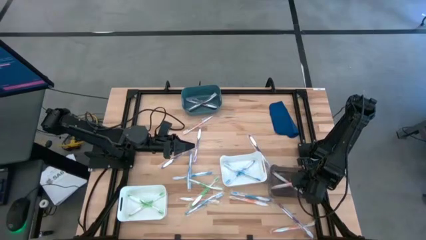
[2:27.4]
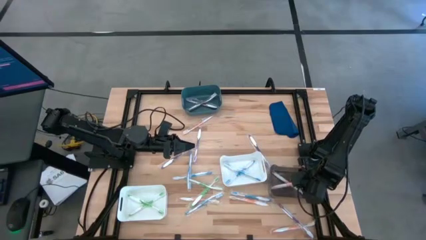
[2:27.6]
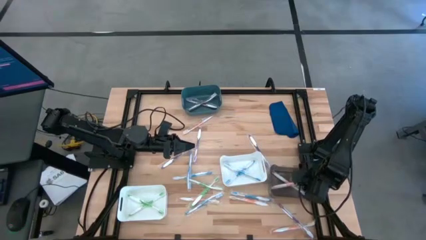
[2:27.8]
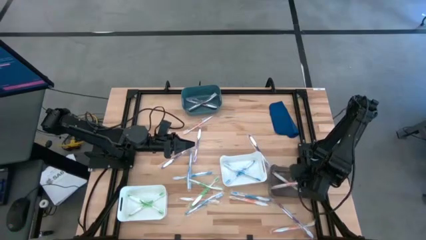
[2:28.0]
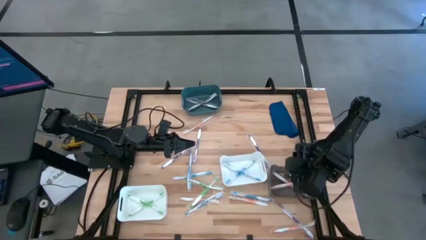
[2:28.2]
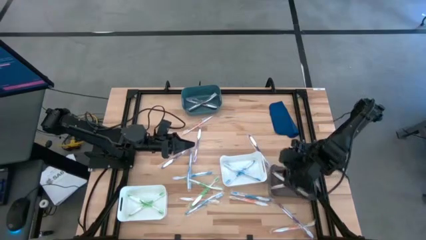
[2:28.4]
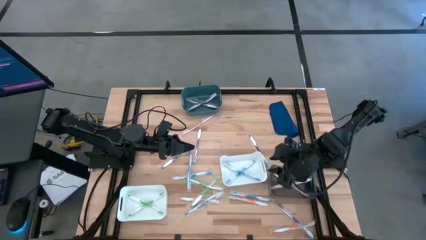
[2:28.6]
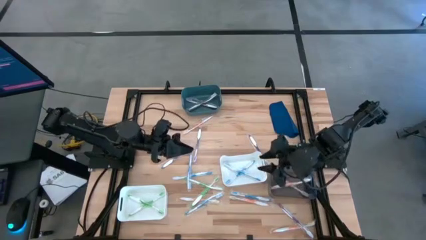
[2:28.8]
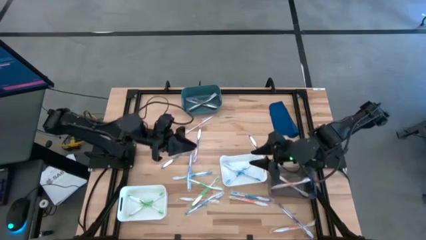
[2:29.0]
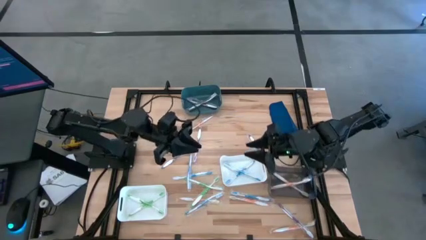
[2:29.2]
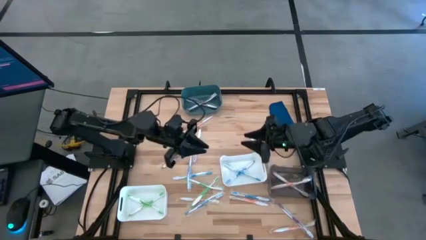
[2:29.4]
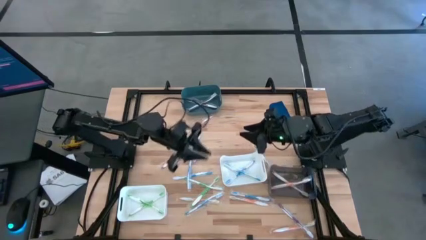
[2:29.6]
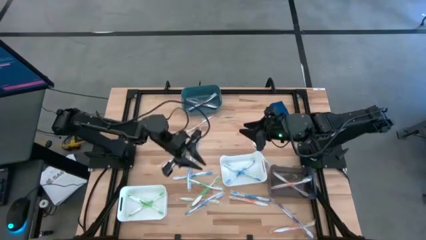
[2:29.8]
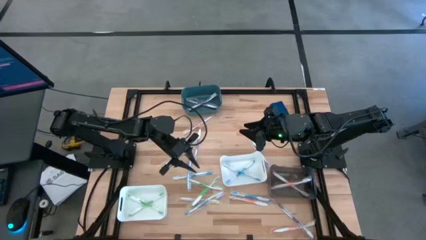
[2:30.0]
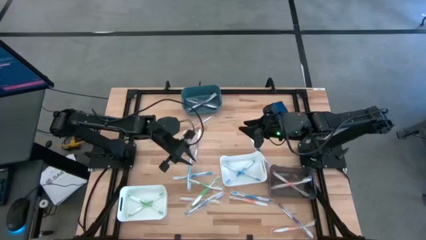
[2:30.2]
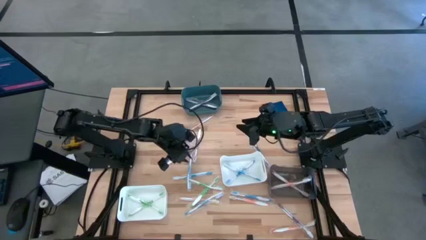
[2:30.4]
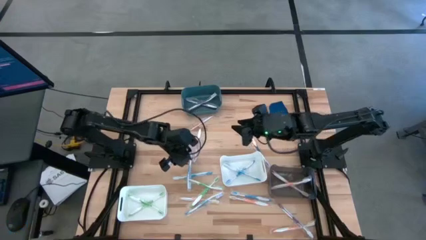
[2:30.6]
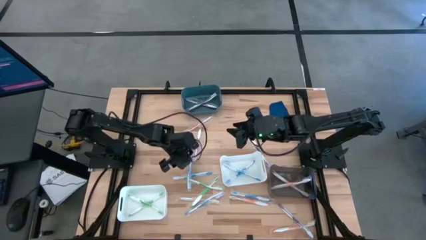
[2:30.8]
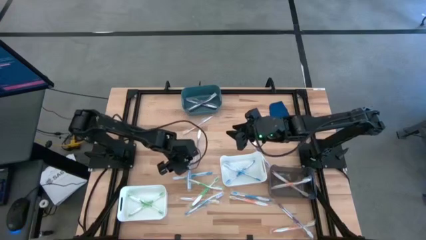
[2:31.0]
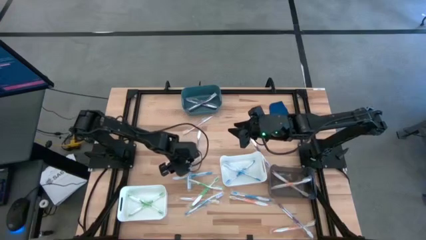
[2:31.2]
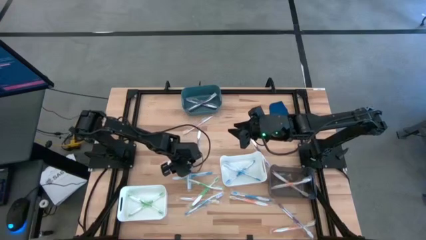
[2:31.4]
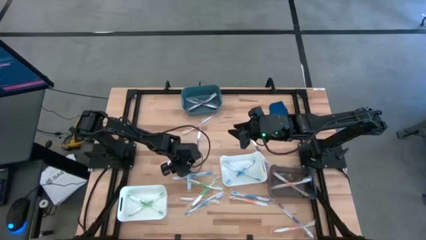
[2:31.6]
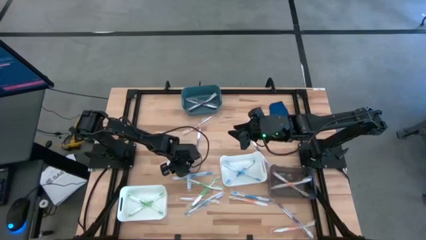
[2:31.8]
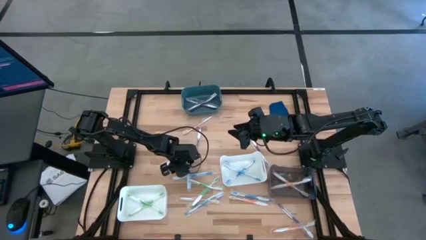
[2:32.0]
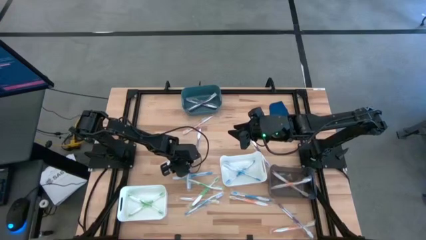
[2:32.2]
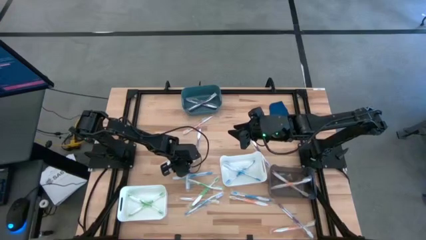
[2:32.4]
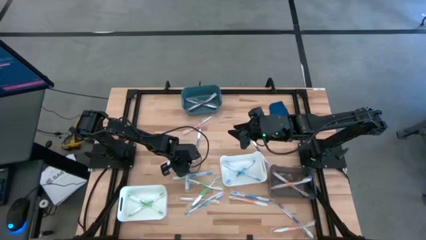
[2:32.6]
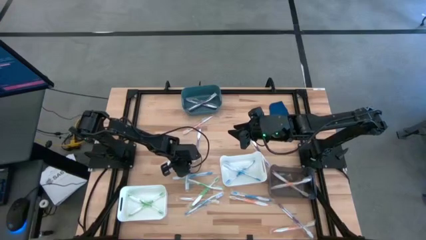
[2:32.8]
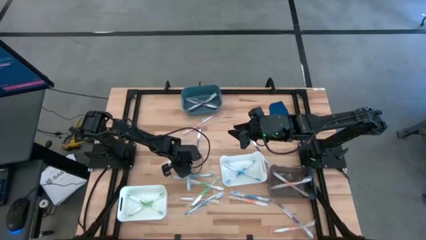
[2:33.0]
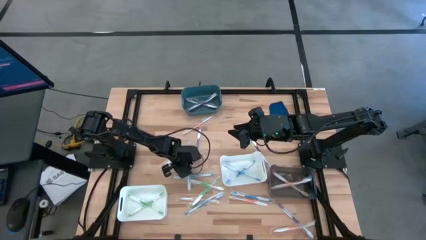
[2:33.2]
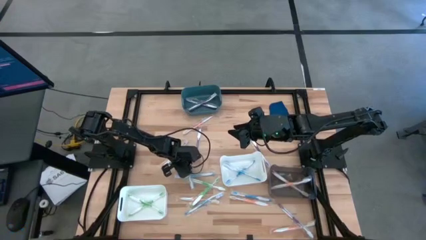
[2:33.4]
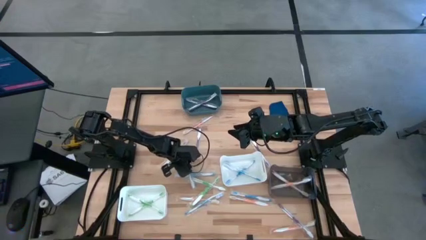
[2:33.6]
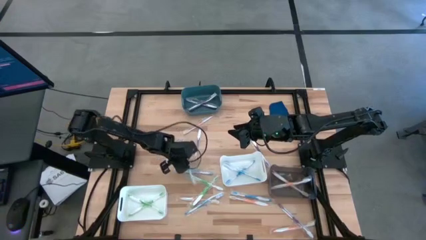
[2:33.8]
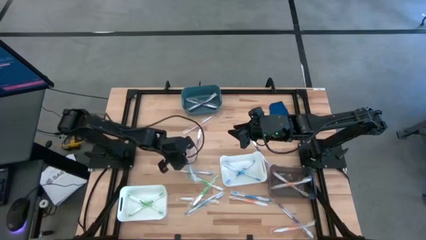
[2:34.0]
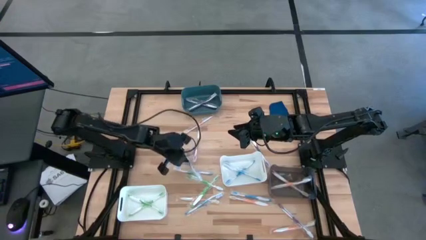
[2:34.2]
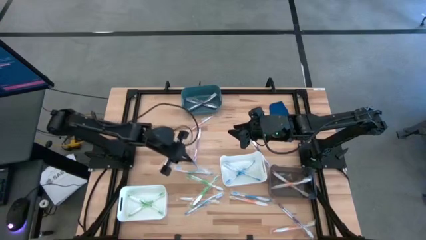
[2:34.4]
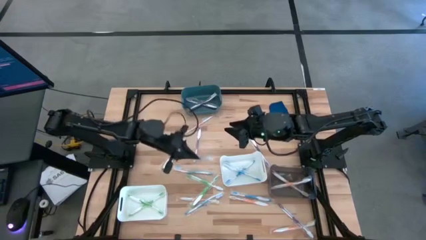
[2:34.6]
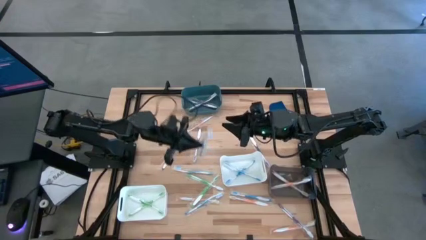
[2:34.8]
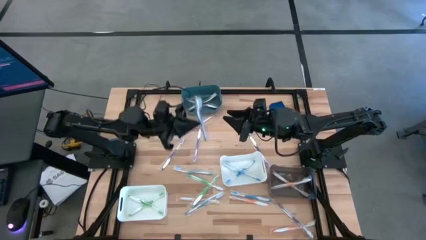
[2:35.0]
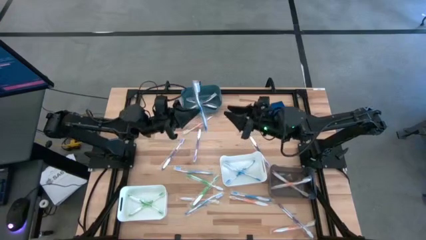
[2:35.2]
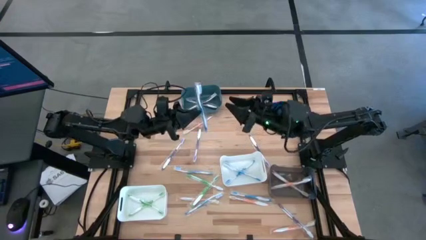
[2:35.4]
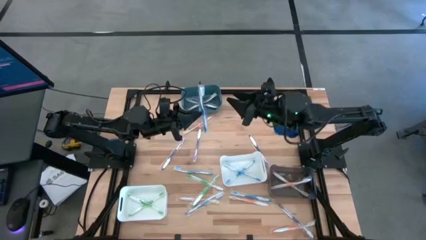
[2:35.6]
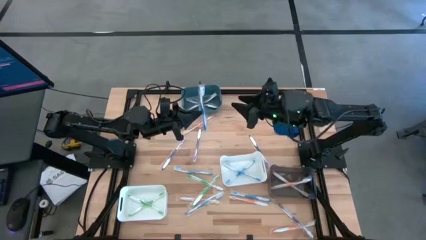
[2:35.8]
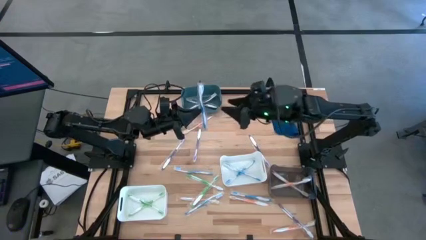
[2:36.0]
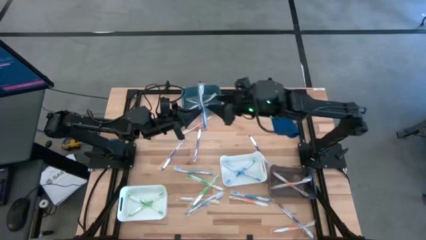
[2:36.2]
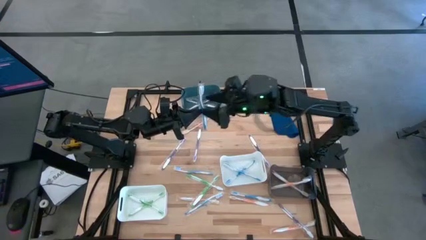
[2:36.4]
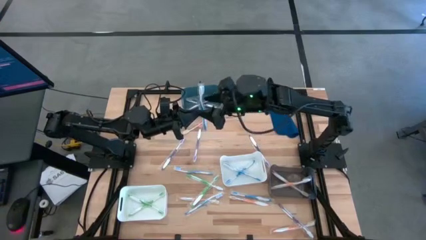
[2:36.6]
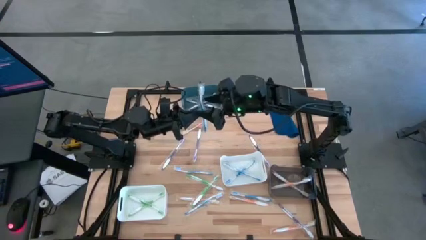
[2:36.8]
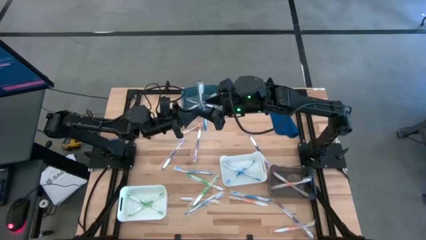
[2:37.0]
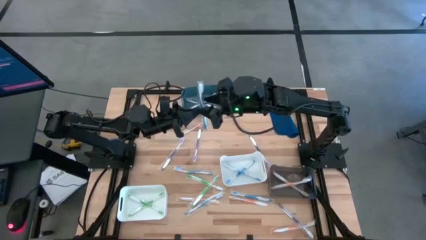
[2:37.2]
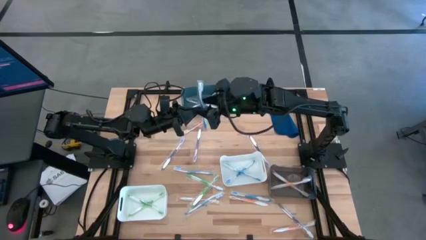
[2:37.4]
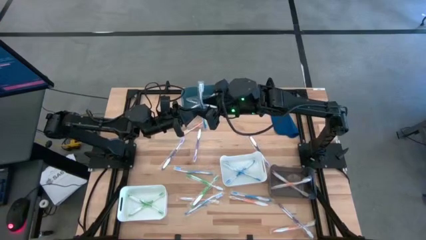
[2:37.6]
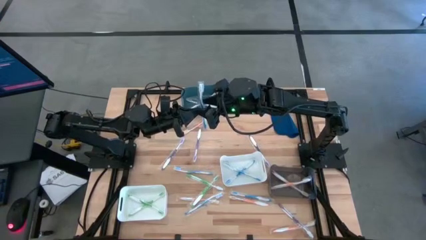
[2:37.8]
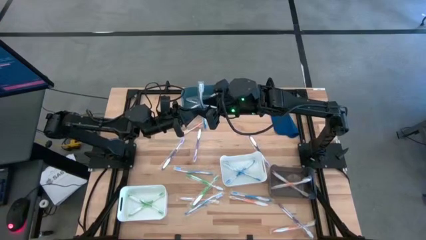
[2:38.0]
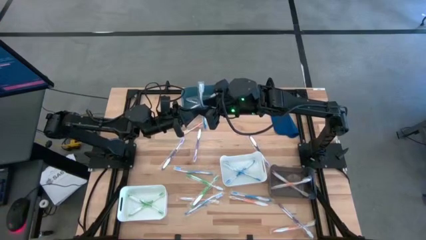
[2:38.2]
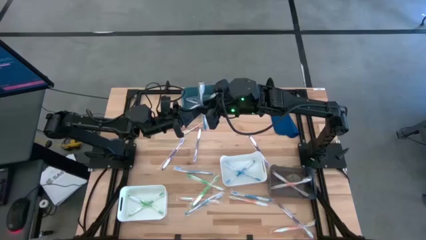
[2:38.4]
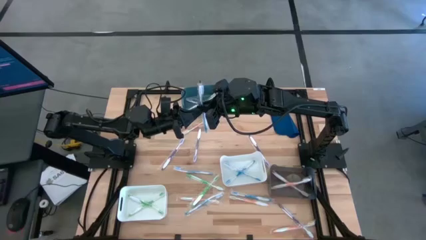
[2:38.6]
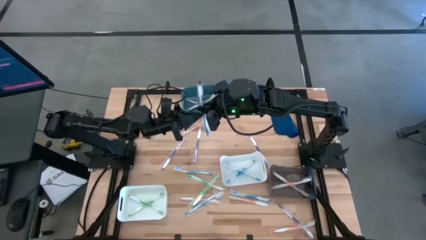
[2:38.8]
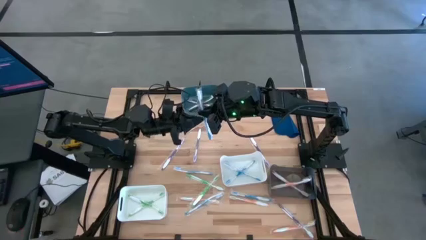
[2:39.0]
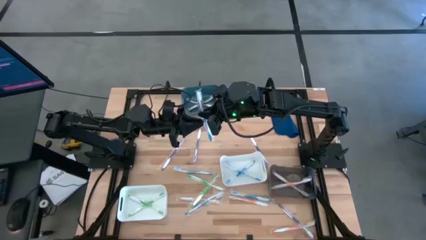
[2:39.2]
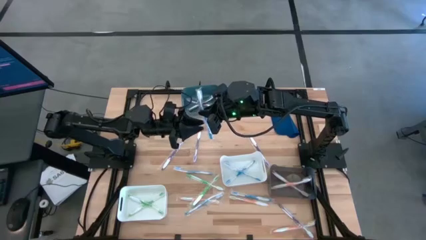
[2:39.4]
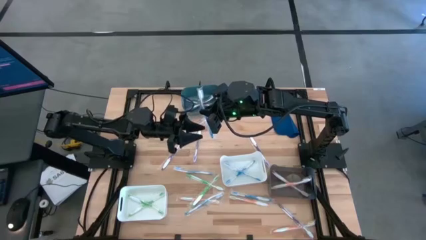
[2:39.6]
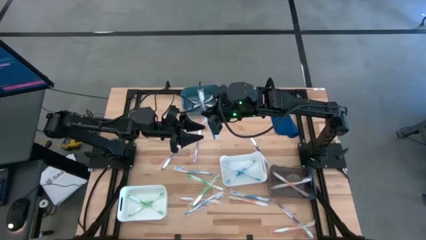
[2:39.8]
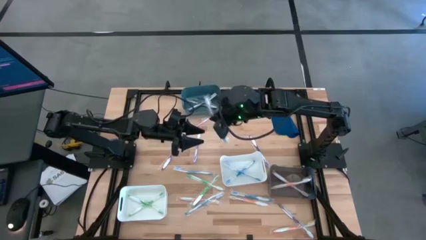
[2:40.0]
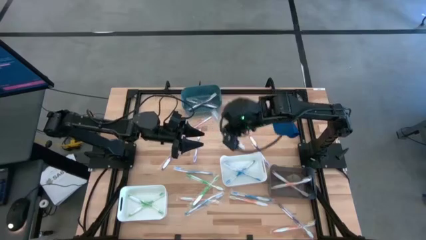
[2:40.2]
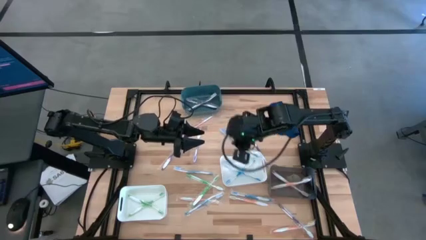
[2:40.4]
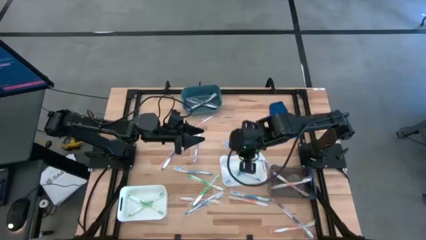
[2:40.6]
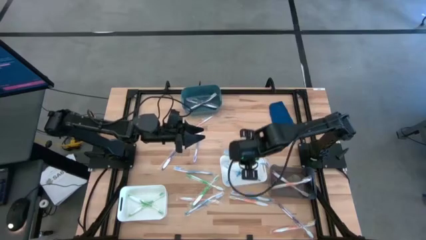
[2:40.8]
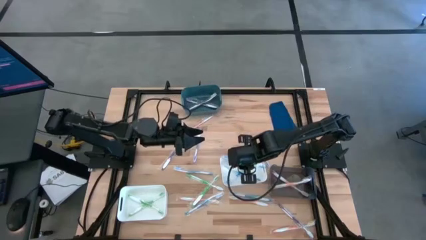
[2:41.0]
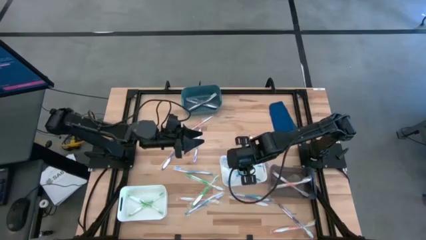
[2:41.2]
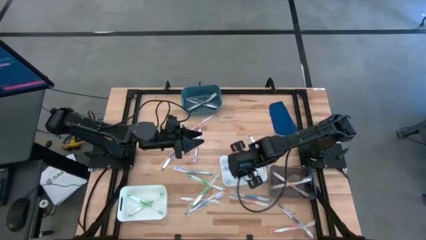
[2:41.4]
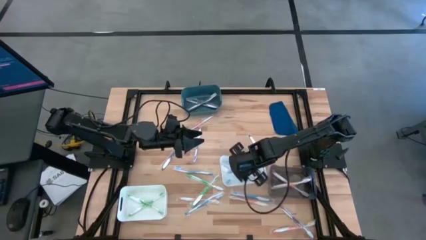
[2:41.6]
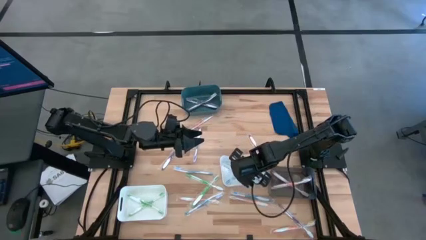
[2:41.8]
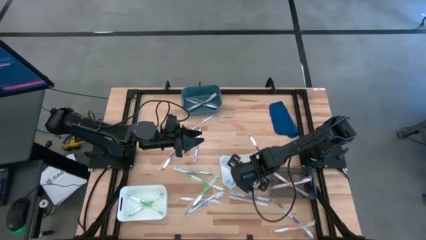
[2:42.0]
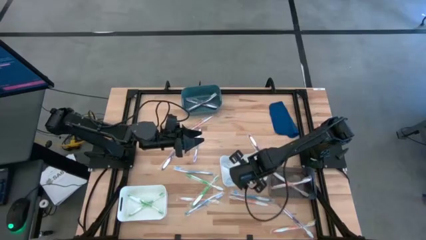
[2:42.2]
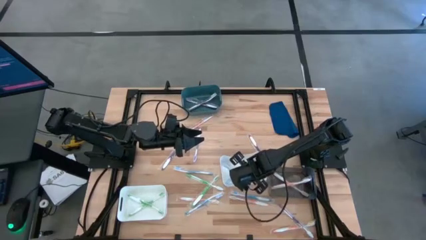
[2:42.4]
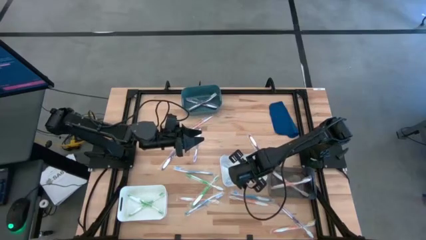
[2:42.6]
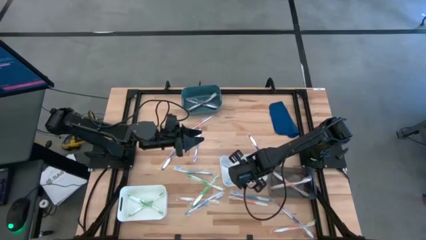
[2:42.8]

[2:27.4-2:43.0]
Task: Pick & Place Toothbrushes
Put the blue toothbrush into the top white bin

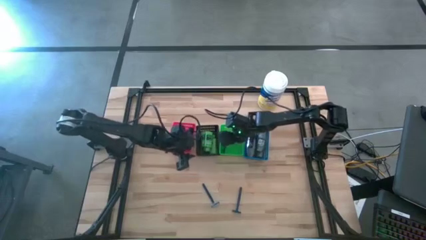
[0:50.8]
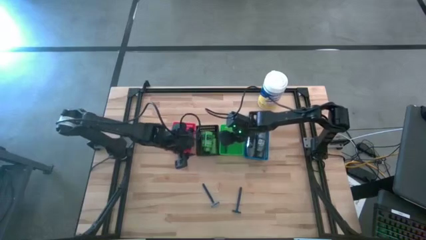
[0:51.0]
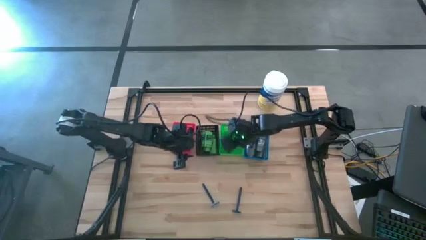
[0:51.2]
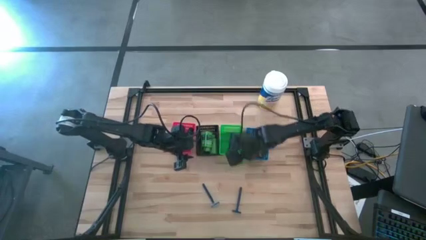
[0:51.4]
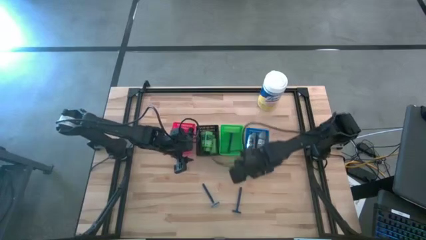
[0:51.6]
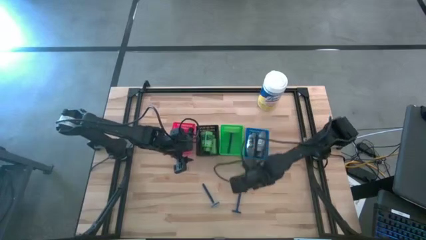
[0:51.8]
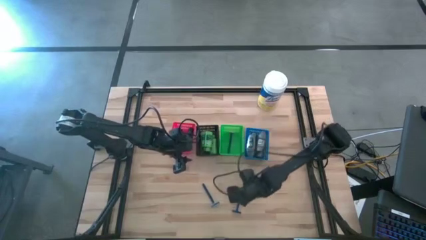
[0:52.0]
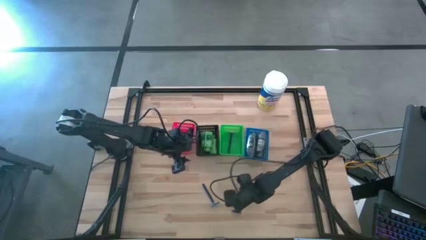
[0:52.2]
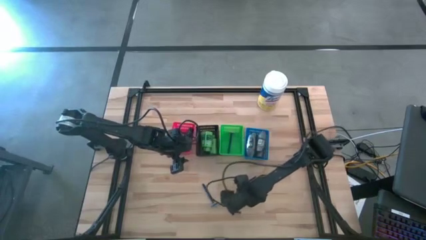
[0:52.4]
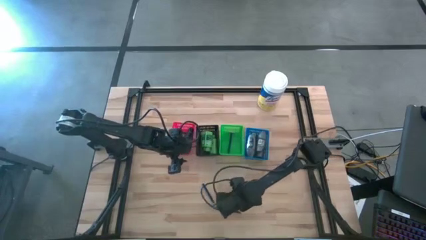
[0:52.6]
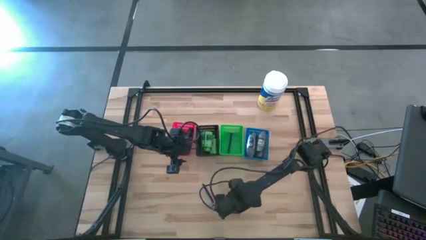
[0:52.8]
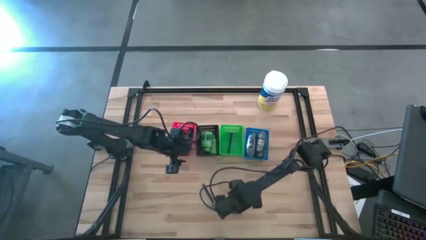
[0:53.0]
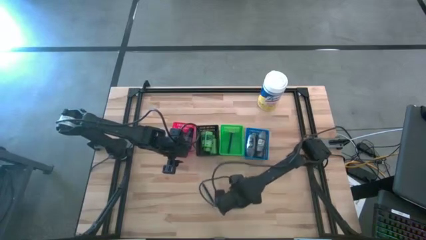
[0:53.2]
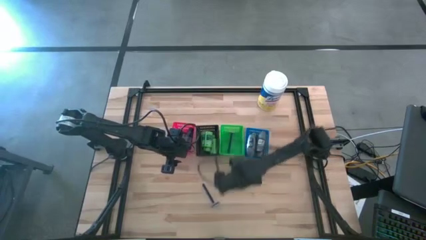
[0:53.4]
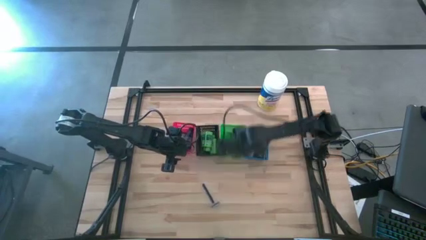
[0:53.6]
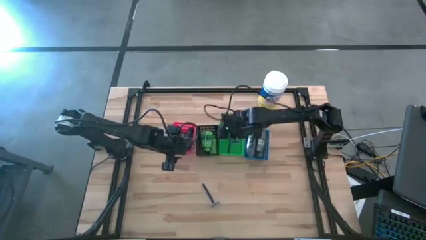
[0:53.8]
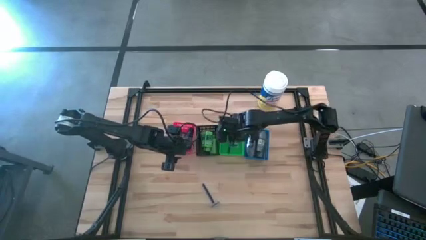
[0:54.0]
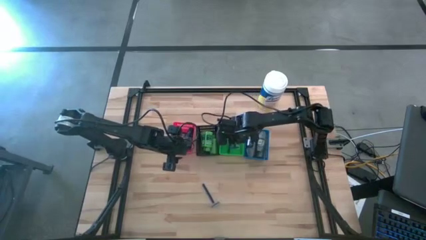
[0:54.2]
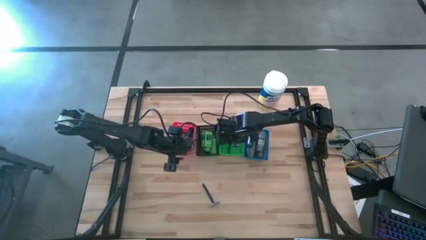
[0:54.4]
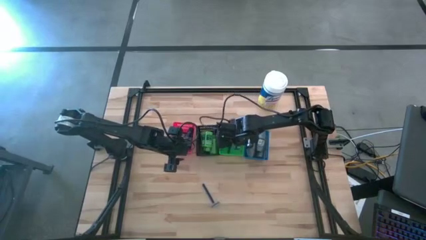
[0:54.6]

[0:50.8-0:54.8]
Task: Pick & Place Travel size toiletries
Put the blue razor into the green bin
